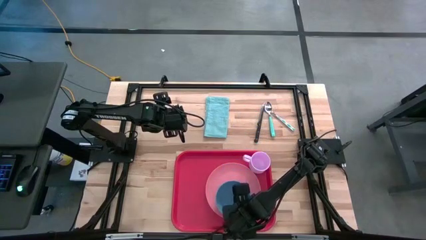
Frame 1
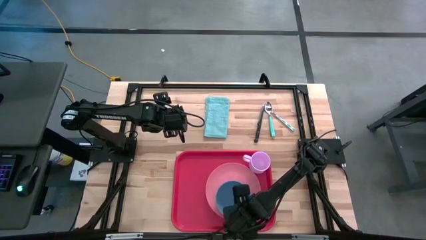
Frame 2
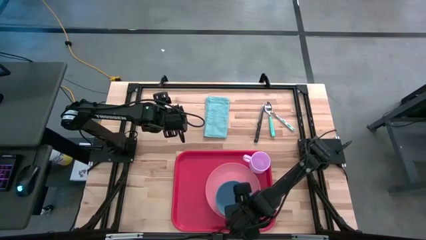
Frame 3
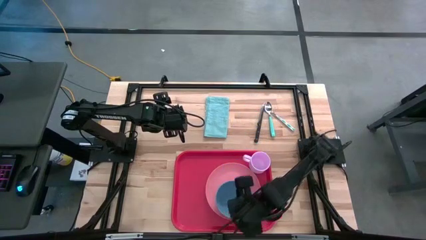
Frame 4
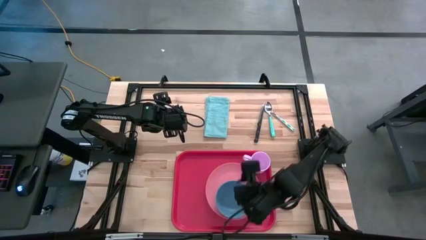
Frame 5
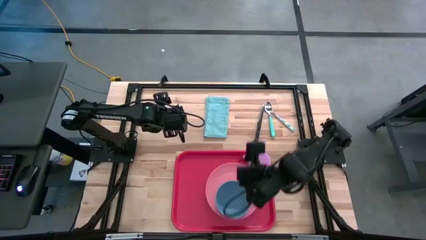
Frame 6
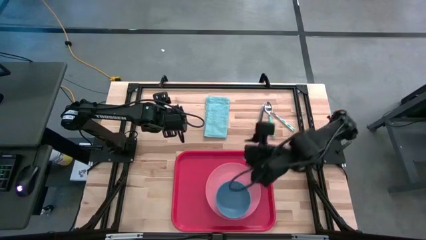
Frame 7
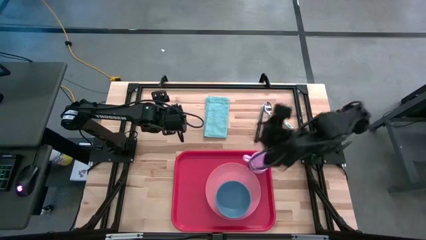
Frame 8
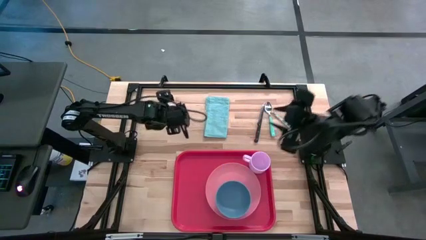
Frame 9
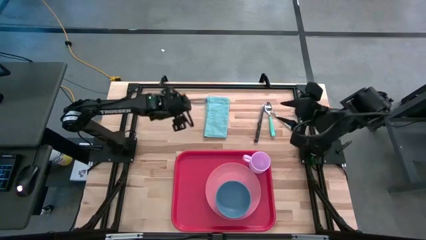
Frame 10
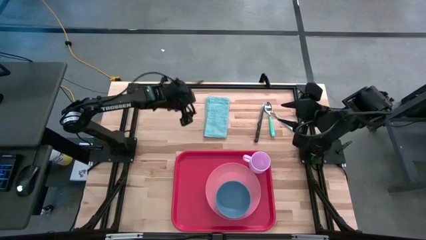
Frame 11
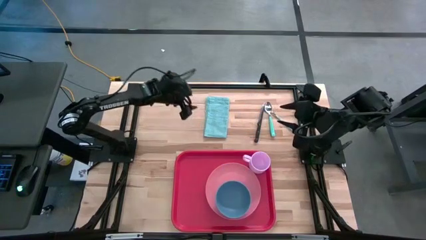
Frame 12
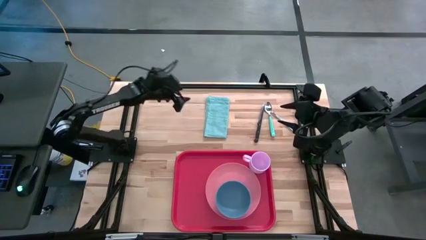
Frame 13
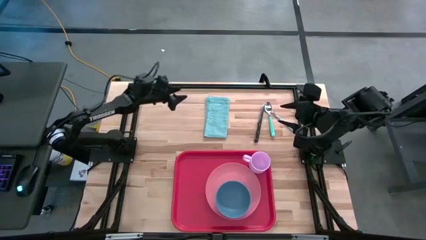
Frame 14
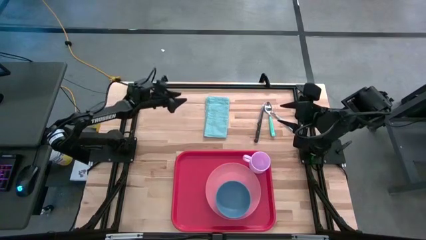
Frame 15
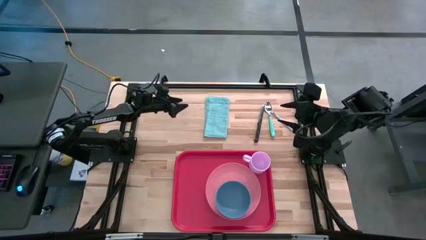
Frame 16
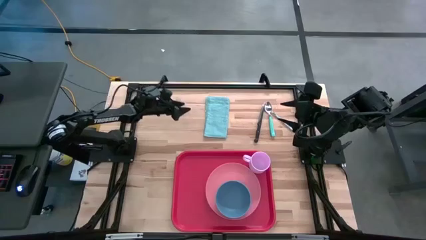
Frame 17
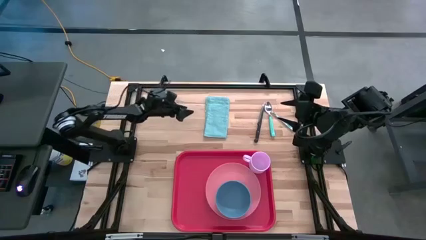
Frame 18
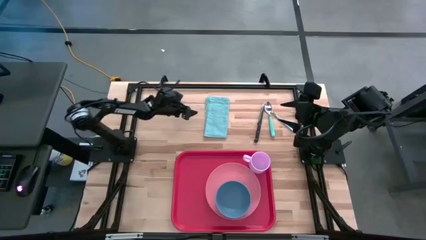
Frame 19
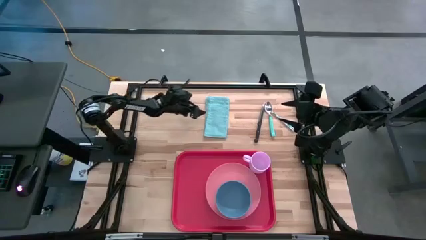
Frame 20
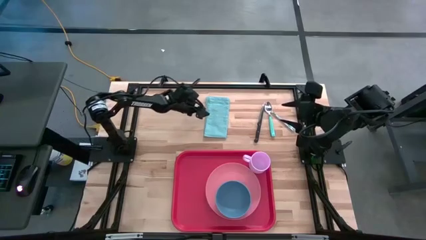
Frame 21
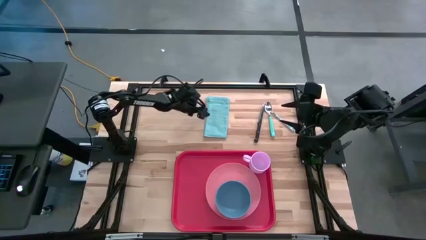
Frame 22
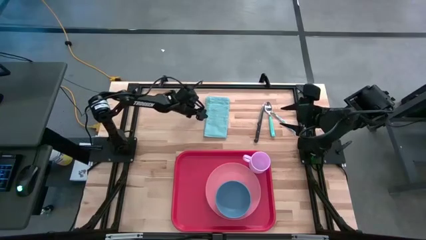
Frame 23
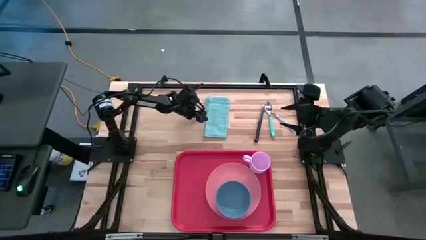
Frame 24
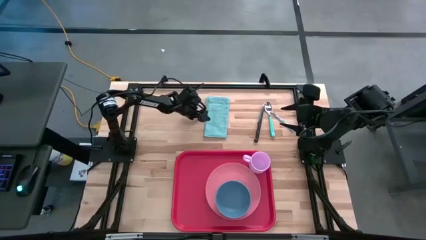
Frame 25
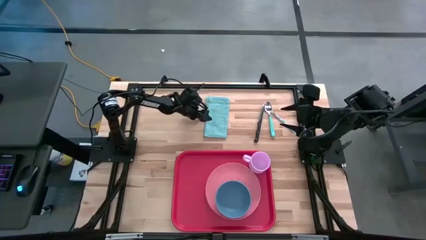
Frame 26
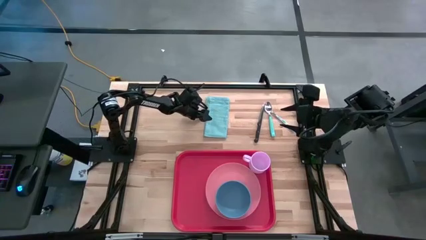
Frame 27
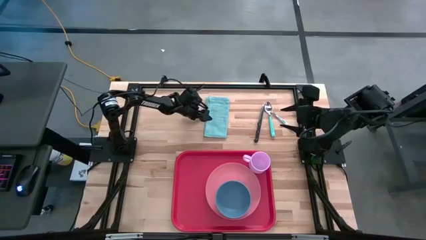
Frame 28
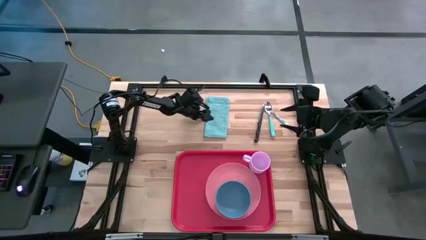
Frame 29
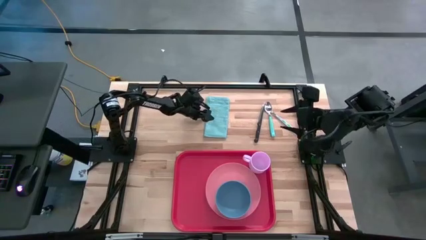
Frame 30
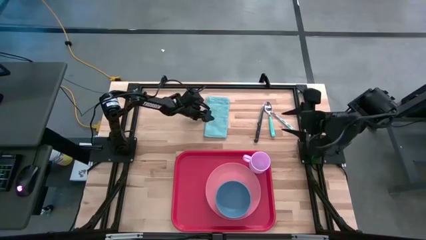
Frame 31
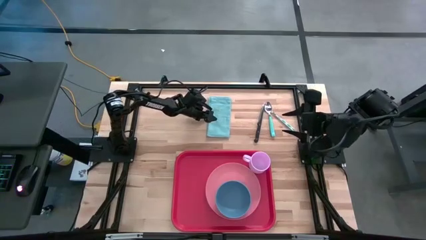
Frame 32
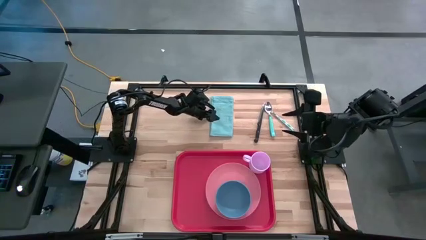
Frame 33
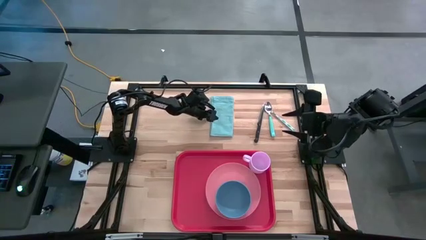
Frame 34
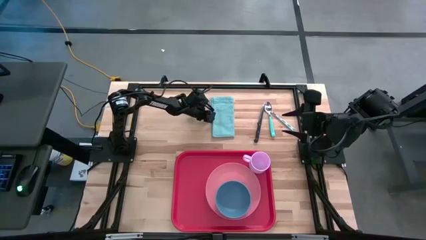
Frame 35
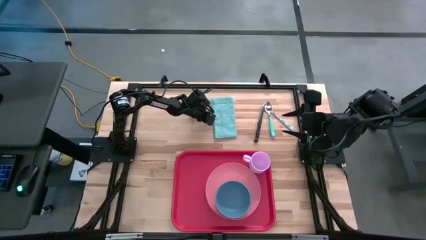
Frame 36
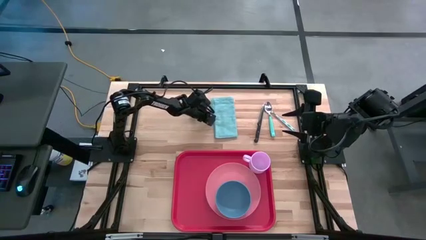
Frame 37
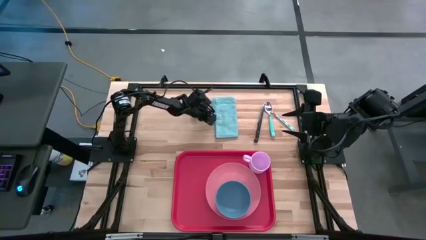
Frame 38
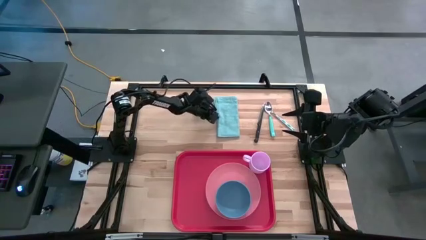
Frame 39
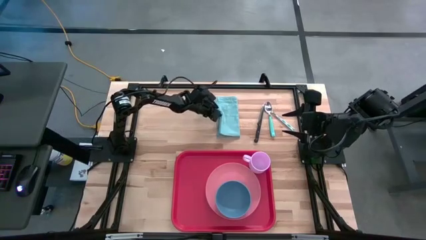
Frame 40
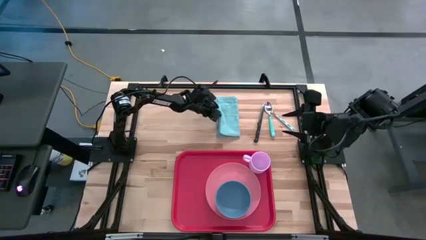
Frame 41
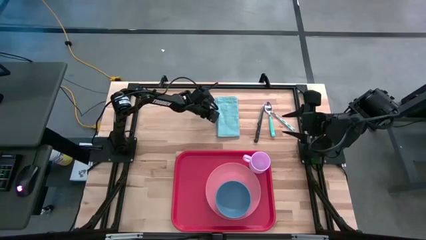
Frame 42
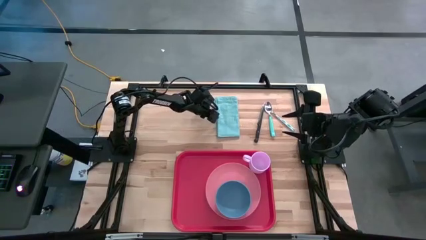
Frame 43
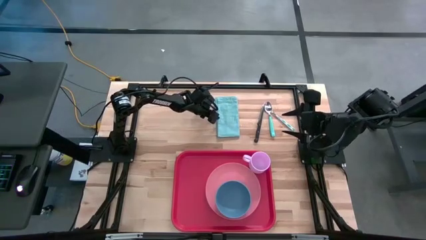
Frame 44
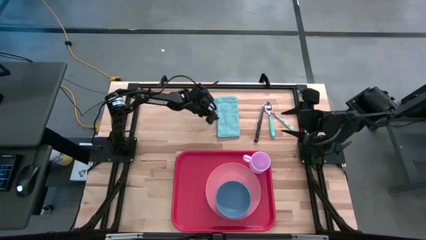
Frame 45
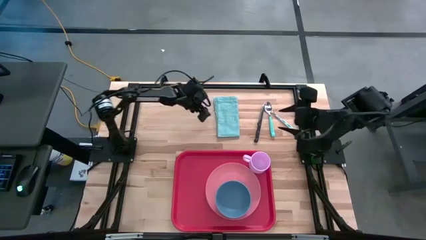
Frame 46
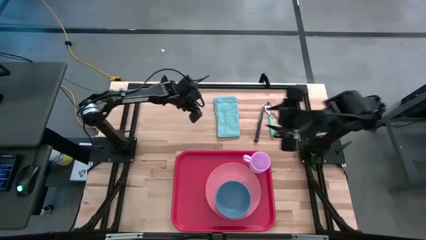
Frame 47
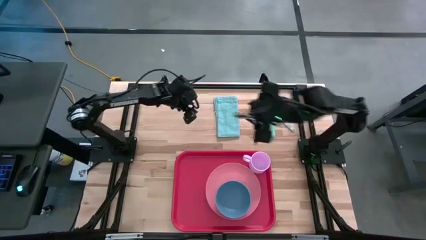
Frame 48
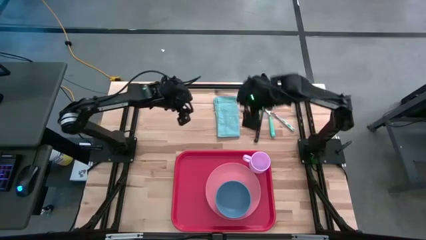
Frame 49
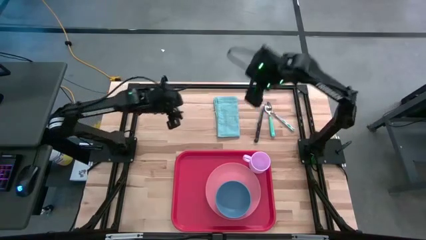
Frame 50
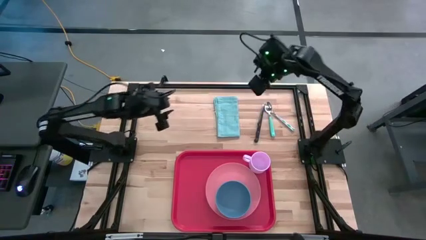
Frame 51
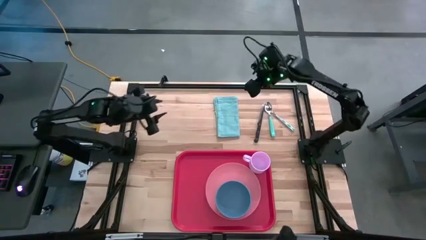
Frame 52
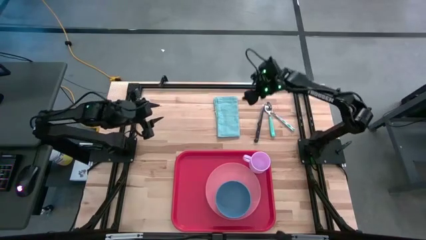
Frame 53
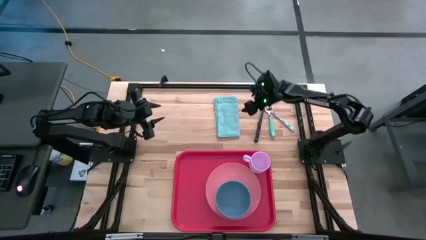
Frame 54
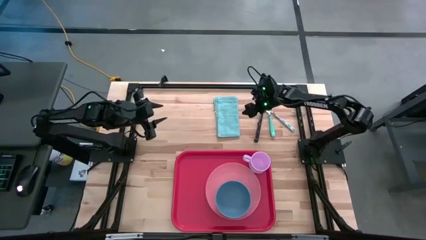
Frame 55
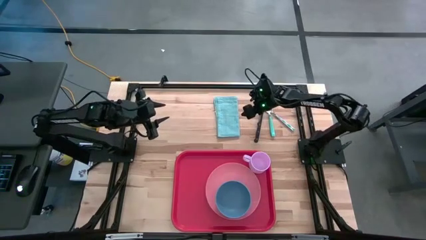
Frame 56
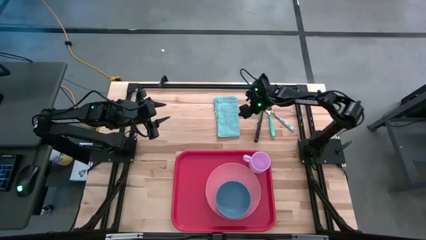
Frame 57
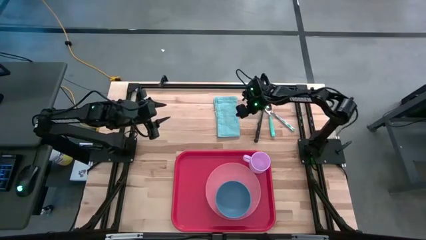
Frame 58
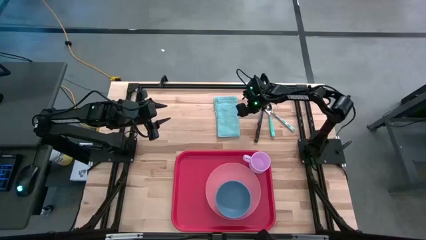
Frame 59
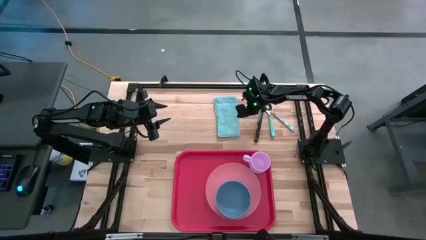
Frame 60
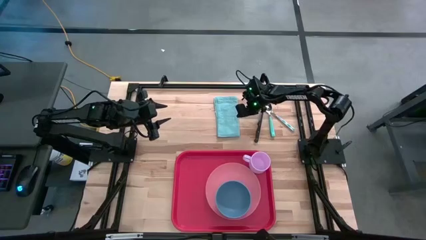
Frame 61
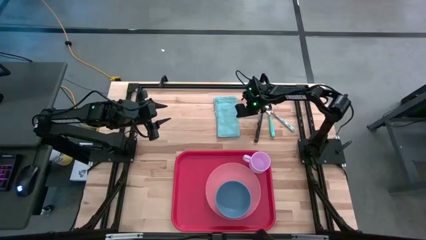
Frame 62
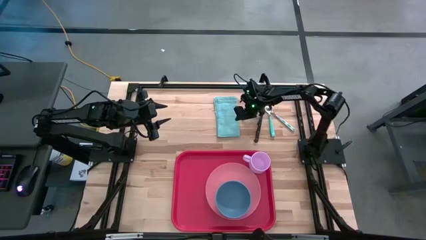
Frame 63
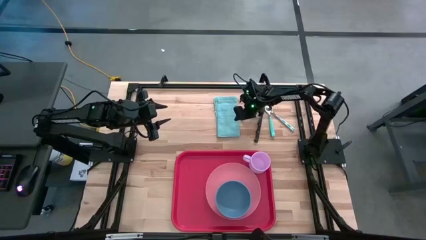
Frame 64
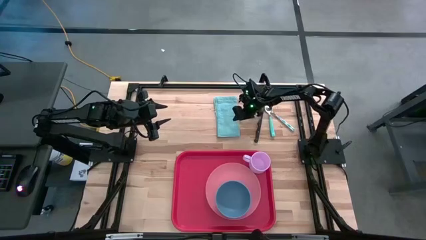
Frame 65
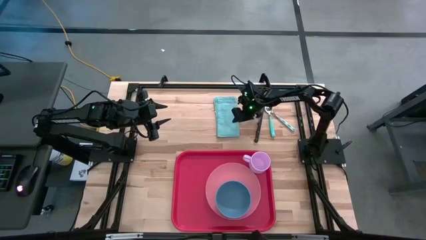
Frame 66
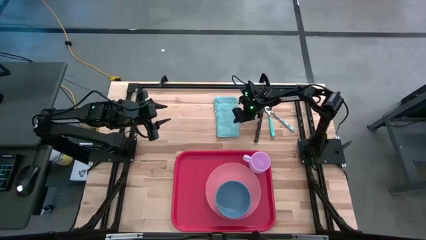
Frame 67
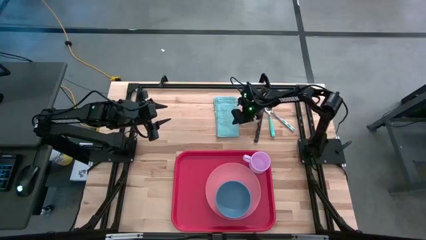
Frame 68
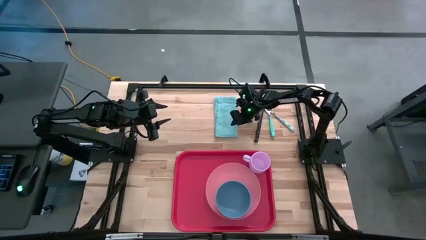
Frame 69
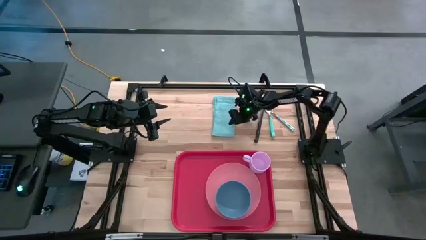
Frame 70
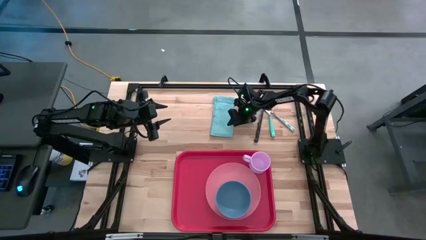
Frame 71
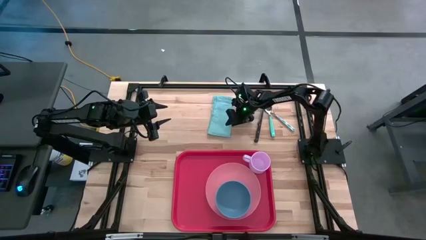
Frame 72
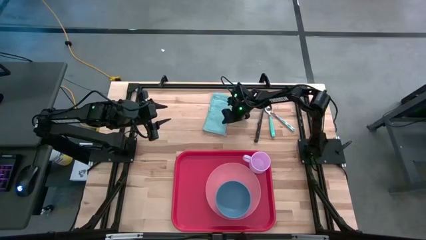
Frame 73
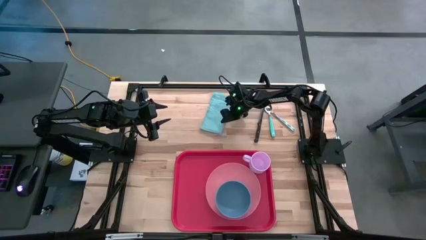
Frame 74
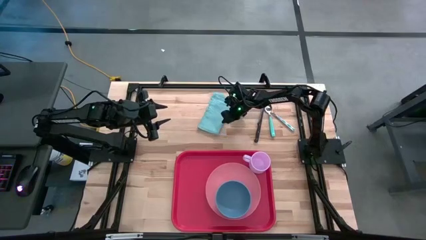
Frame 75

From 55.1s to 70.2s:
Task: Set up tray
Put the blue napkin on the red tray beside the pink plate
